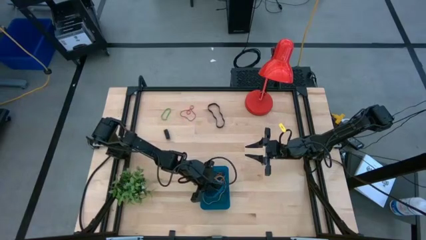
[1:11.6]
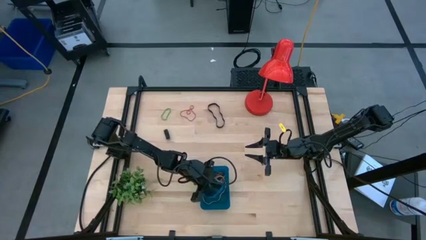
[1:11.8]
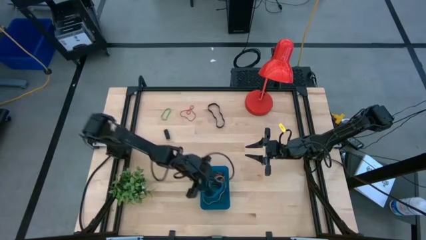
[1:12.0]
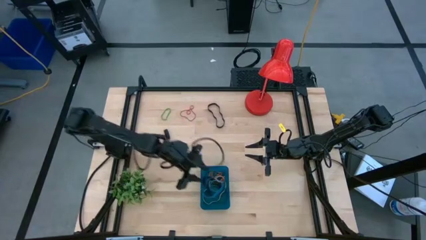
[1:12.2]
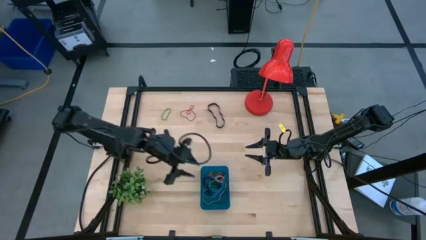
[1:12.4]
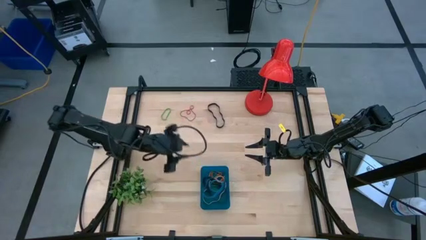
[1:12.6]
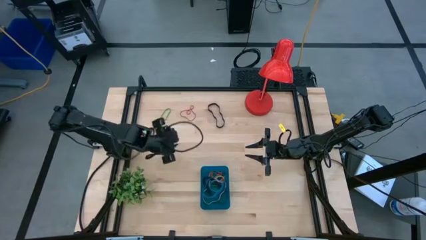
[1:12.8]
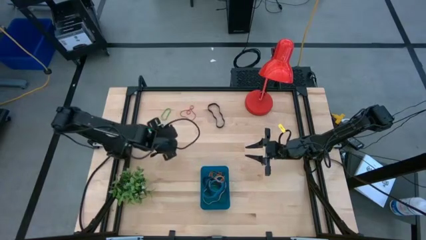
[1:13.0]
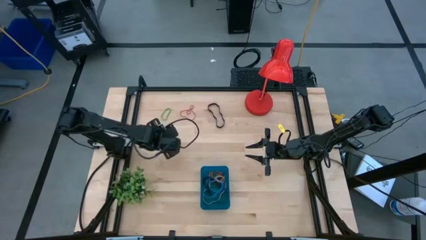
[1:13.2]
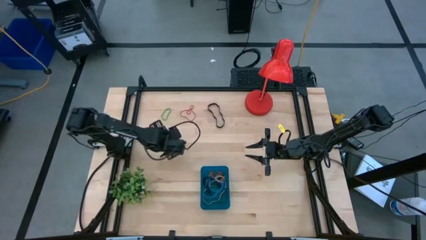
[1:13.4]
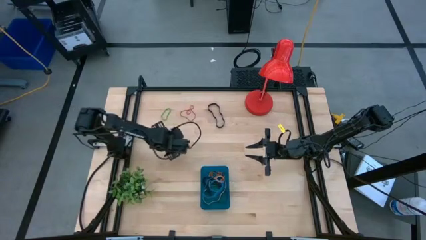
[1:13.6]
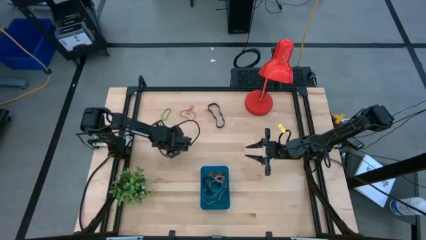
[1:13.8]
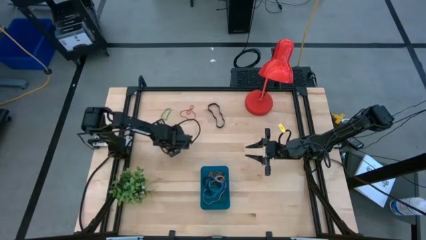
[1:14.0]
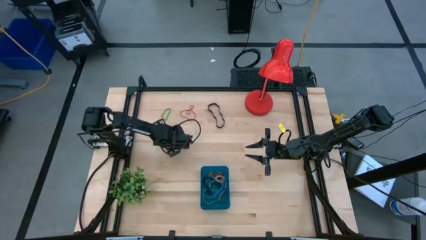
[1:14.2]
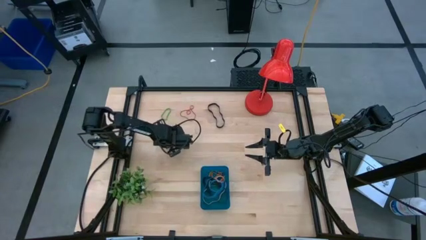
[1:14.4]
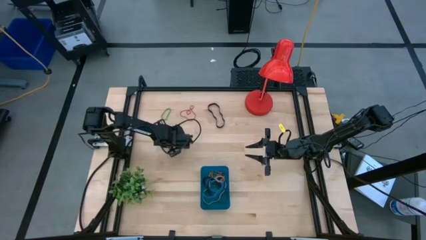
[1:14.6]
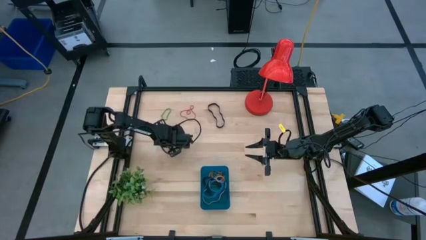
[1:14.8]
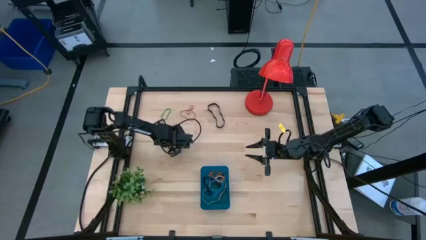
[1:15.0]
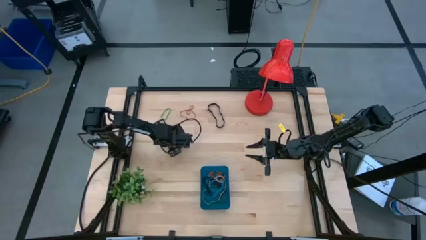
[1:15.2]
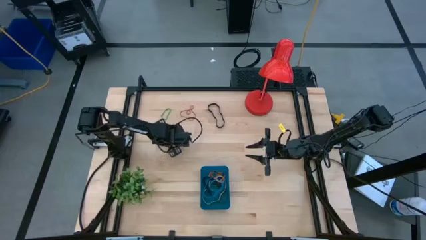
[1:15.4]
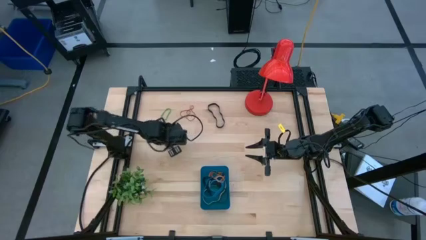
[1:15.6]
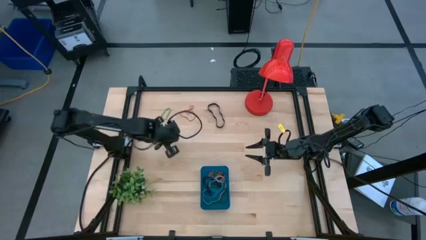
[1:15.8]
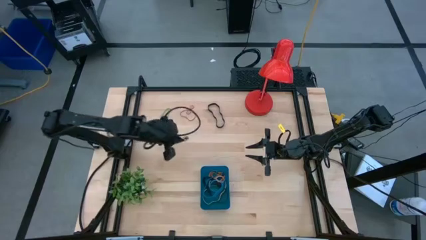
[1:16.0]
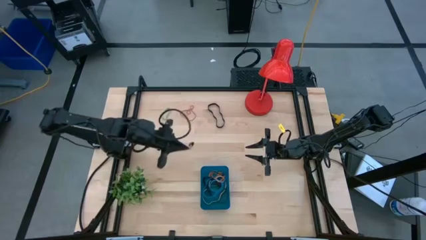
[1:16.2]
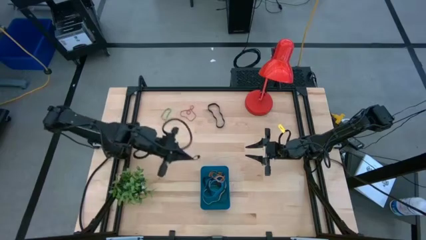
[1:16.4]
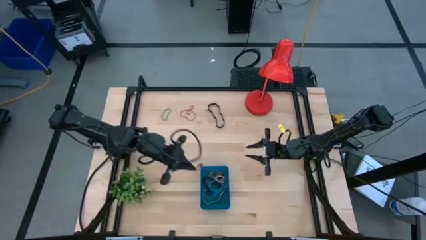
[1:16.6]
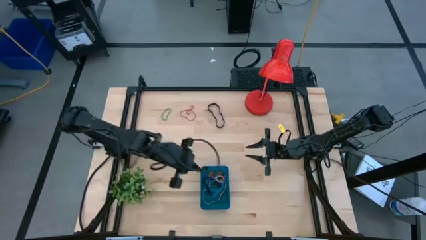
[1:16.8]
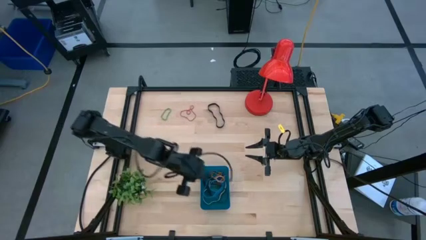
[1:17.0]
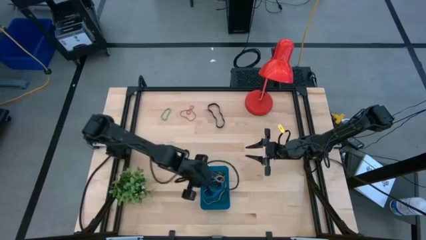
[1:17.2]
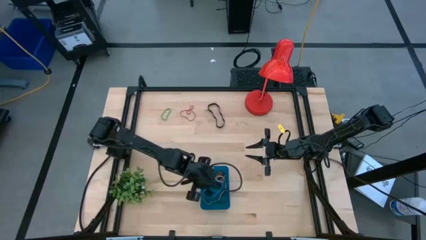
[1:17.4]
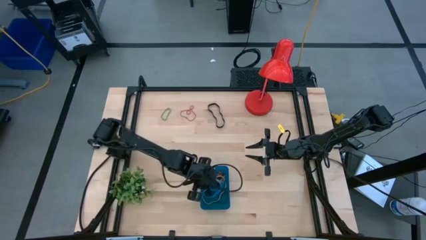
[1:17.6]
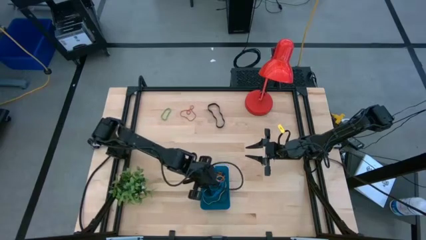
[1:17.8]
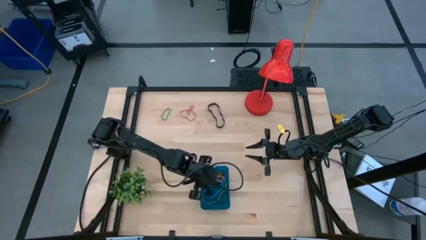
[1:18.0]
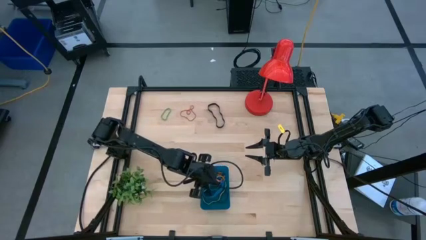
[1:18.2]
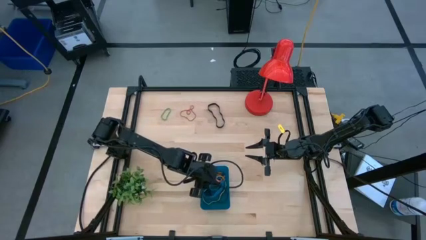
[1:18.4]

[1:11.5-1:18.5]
Task: Pick and place rubber bands into bin
Put the bottom black rubber band into the blue bin

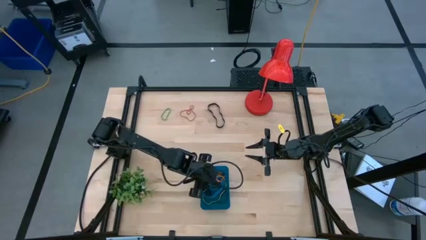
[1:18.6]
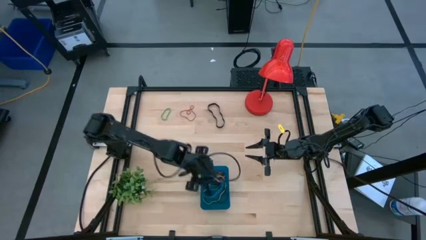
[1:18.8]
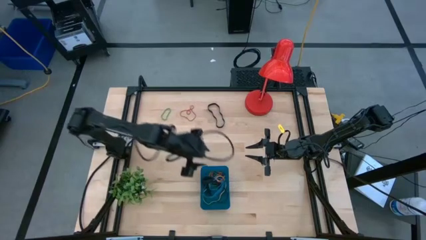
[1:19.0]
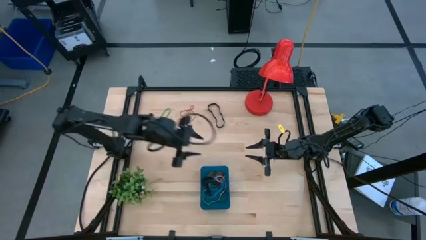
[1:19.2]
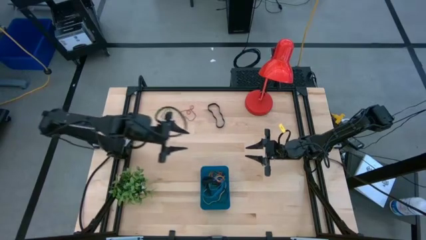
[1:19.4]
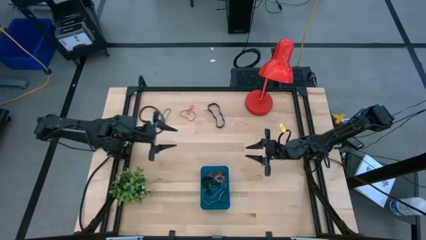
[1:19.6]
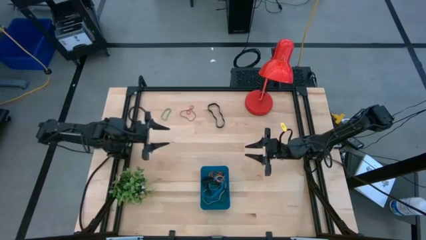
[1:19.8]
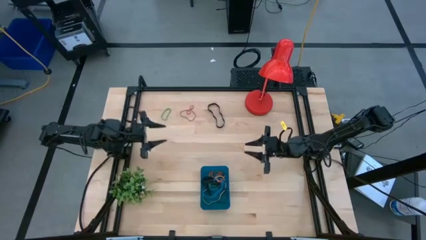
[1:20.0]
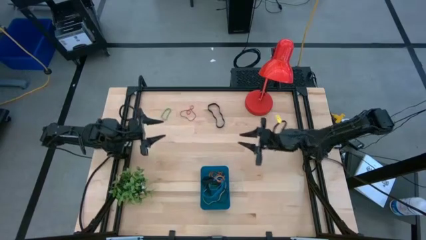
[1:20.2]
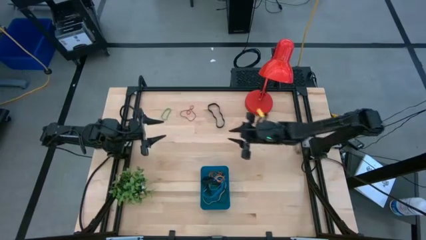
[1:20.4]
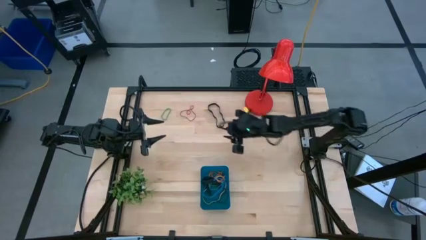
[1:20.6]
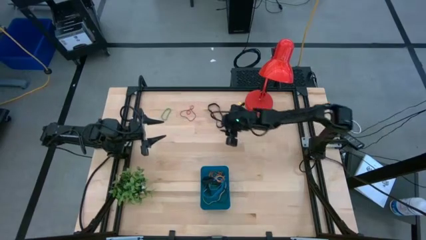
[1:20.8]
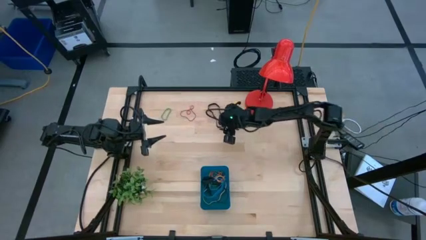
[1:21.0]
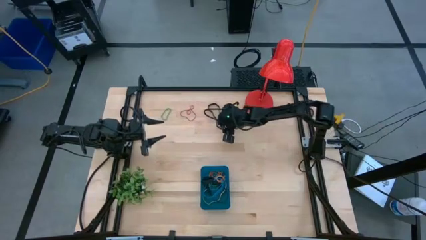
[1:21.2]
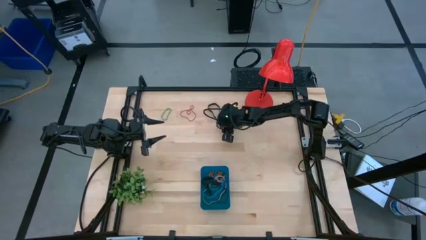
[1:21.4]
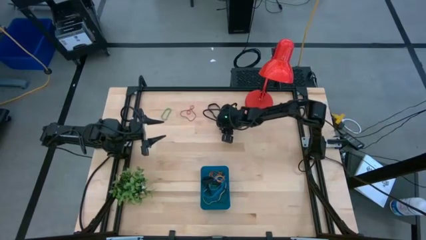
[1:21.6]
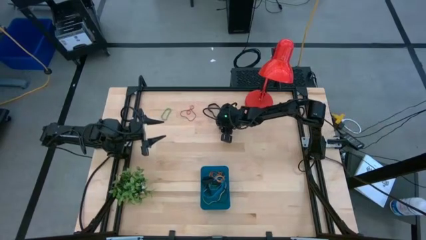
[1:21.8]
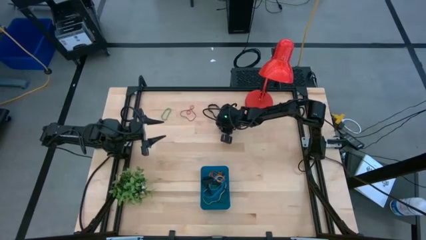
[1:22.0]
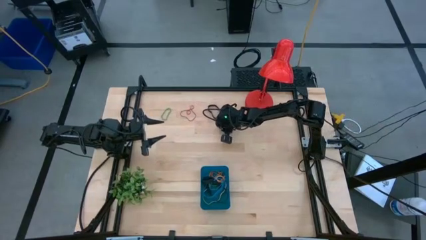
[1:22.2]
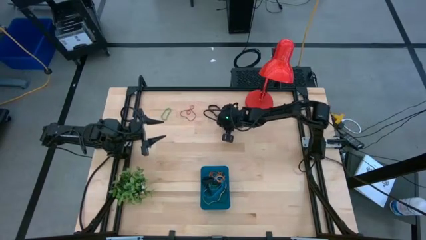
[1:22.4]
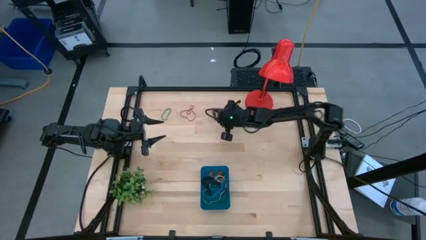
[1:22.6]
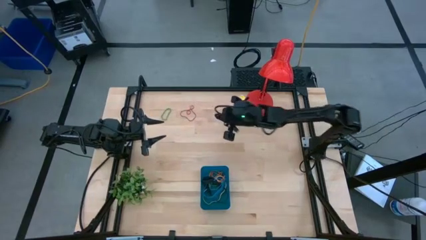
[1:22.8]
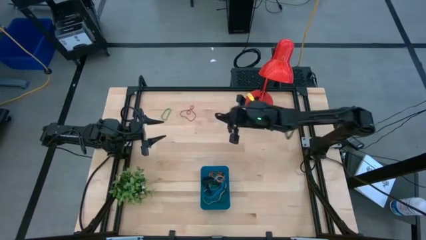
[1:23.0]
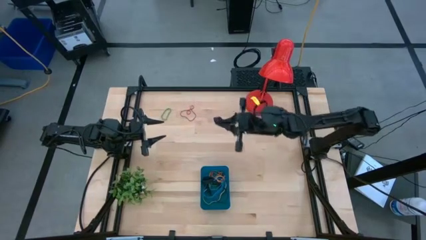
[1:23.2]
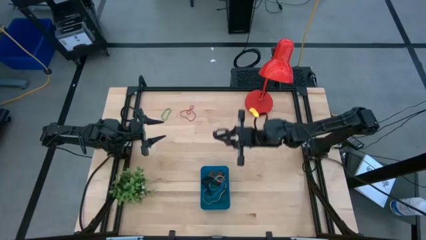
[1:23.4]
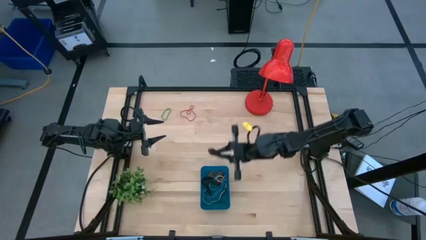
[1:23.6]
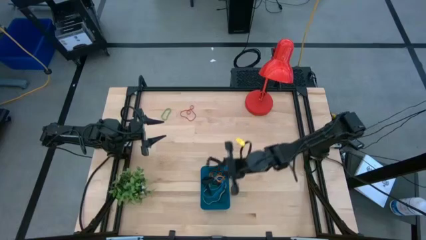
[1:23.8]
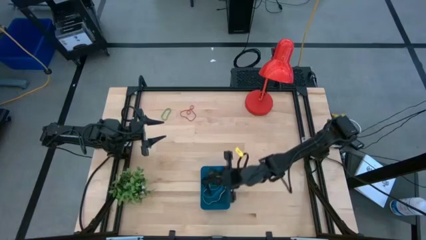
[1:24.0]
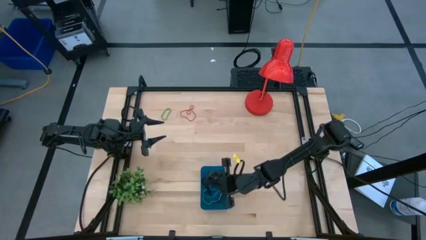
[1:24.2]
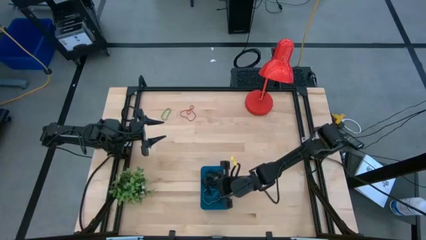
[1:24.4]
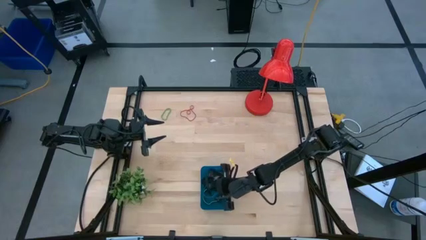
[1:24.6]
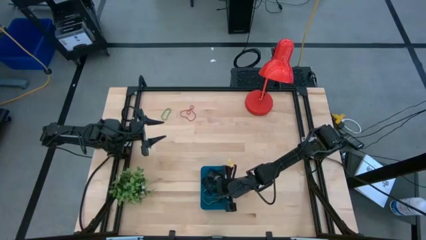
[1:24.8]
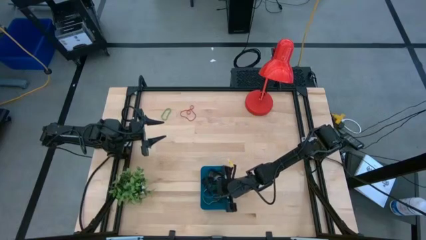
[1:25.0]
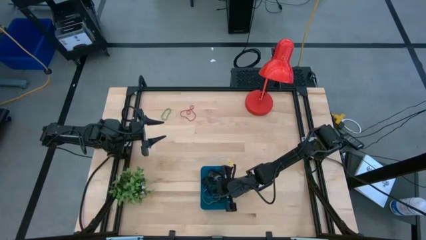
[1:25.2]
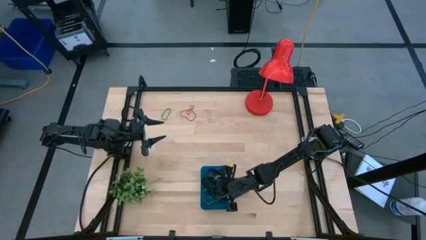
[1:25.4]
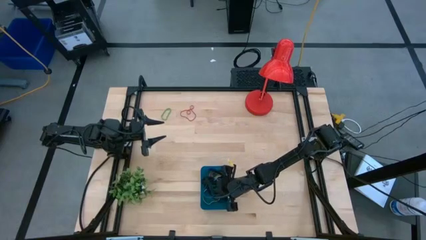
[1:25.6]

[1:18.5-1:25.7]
Put the black rubber band into the blue bin

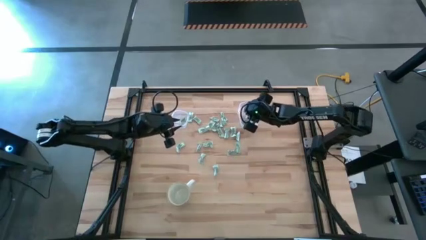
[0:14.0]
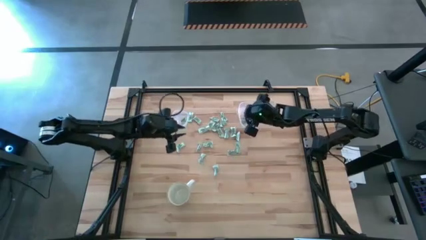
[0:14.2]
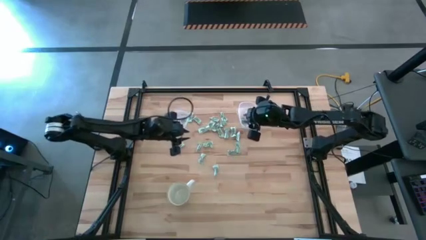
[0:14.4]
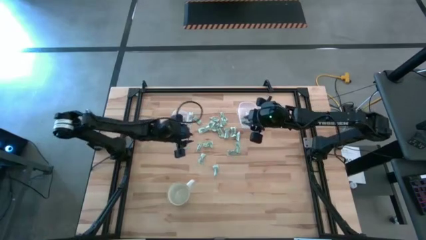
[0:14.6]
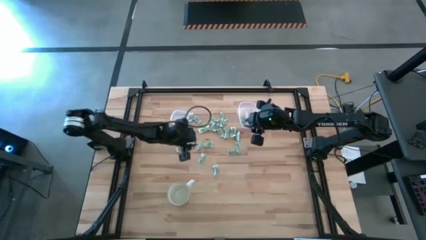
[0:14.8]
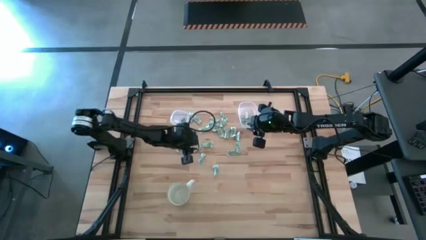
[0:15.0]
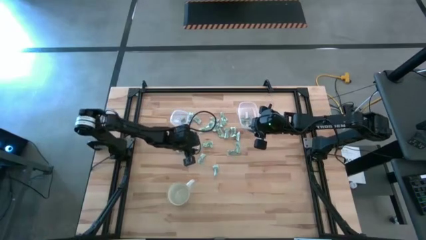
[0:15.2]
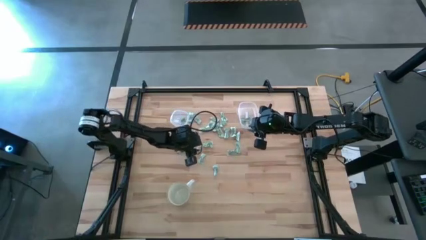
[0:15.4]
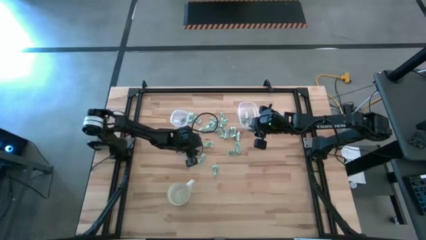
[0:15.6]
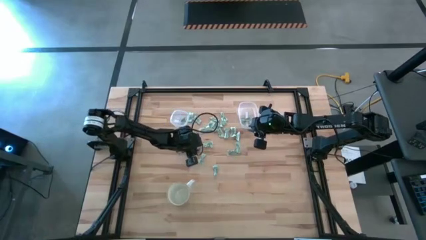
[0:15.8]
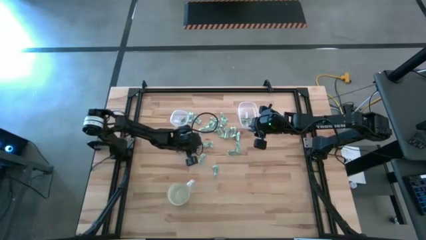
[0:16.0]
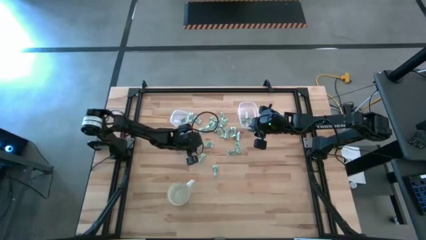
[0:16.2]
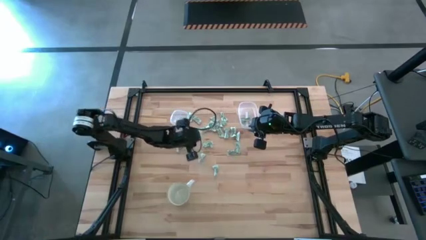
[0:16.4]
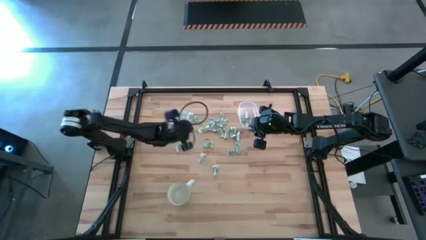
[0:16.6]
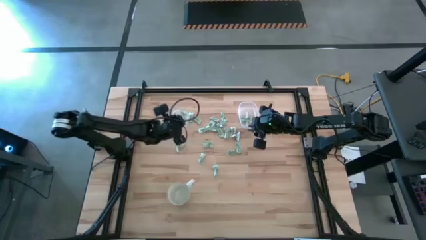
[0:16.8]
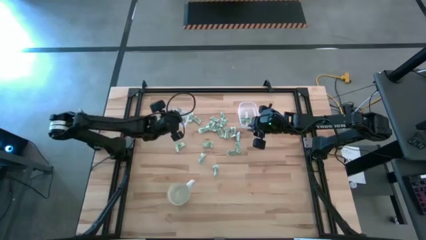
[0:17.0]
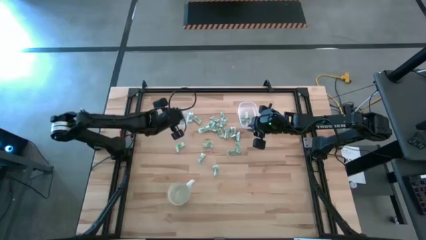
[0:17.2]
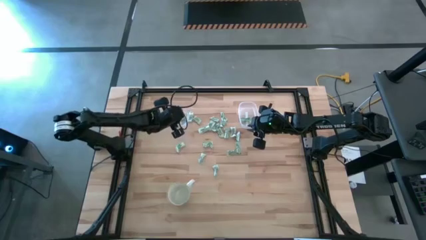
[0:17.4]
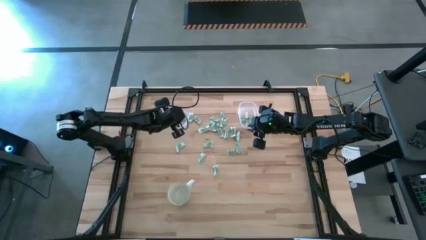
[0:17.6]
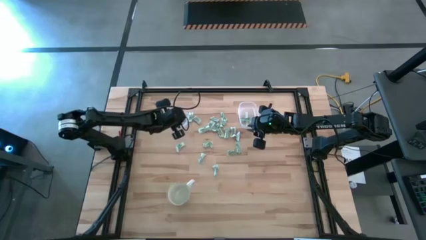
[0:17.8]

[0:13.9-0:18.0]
Task: Pick and place items into bin
Put the green stevia packet into the square transparent bin
